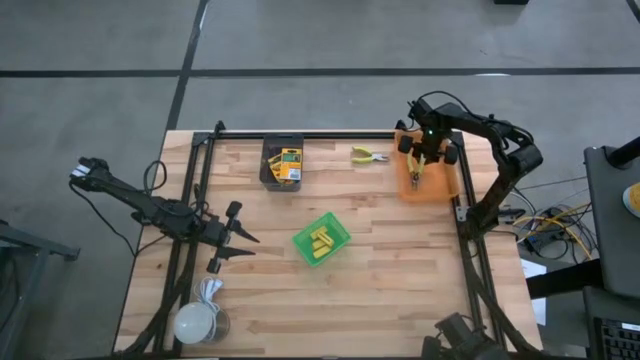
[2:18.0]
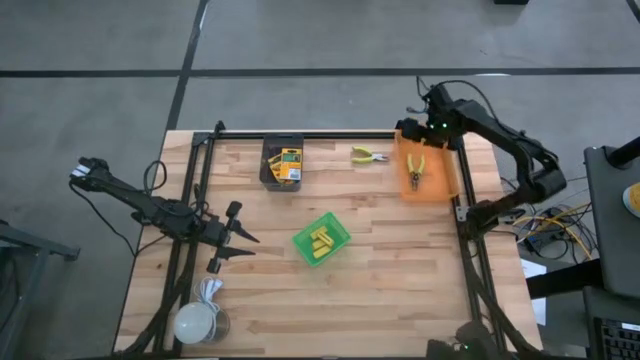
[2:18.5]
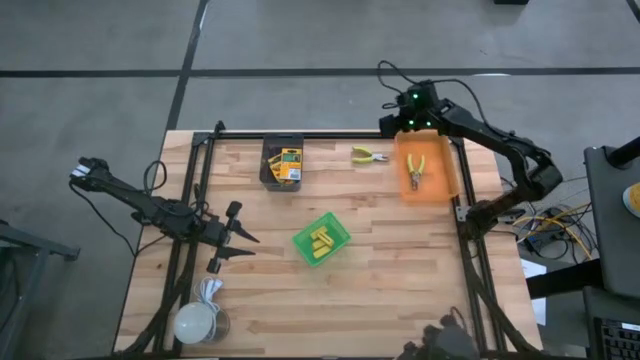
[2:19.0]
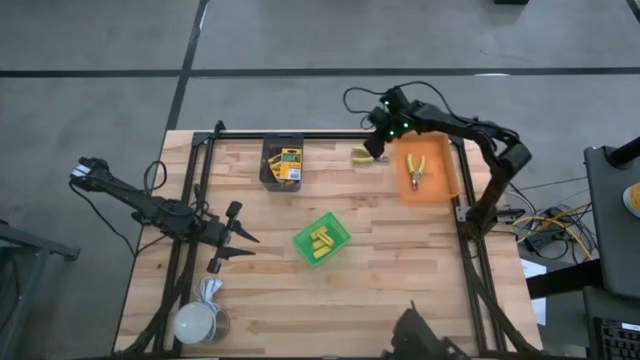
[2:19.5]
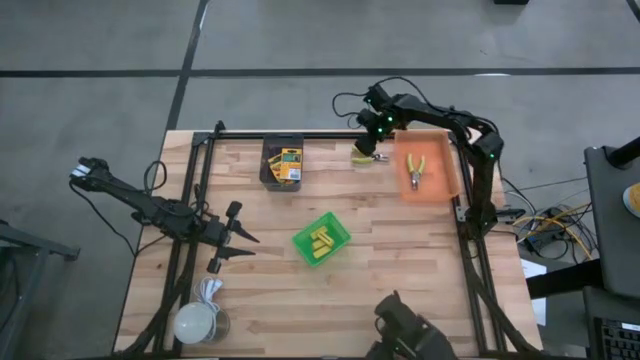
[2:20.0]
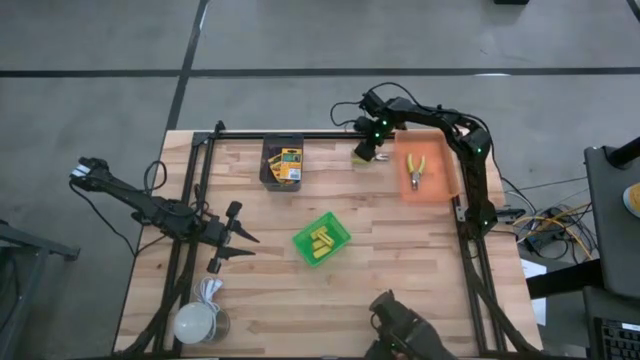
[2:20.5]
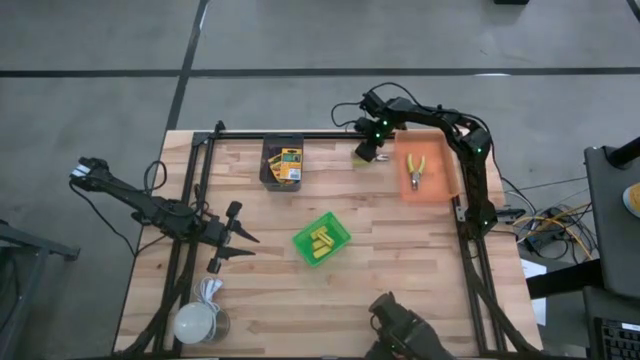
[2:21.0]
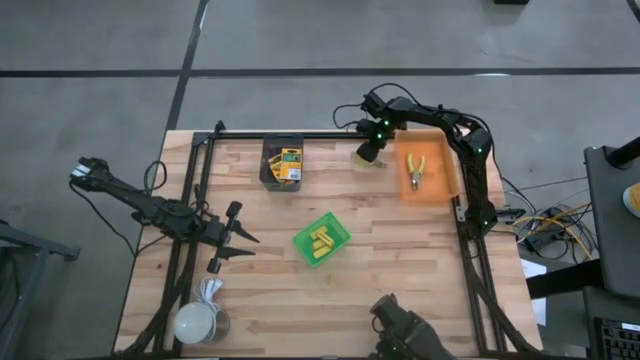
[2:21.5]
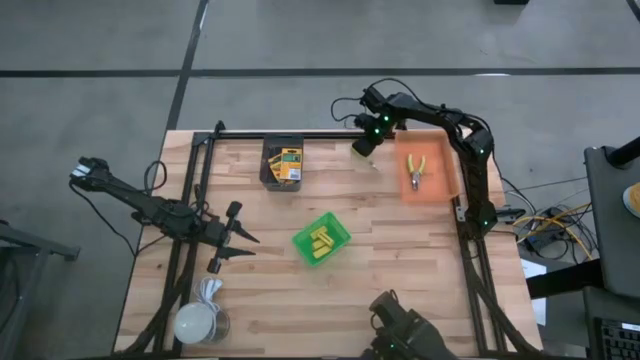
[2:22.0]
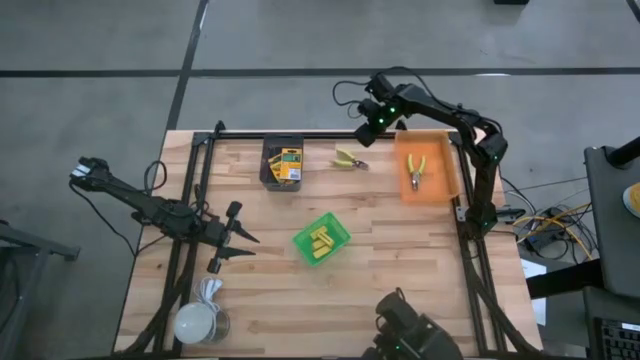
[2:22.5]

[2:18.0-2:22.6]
Task: Pick & Place School Supplies
Put the green hole puncher into the orange bin

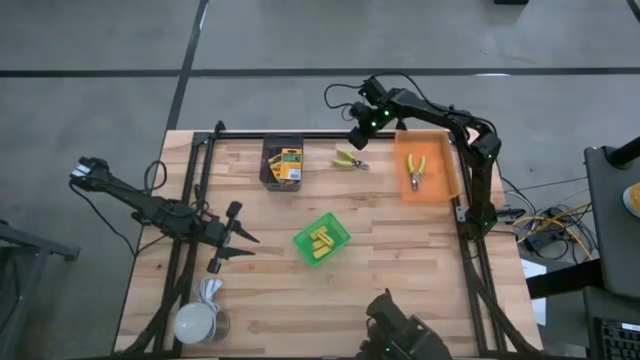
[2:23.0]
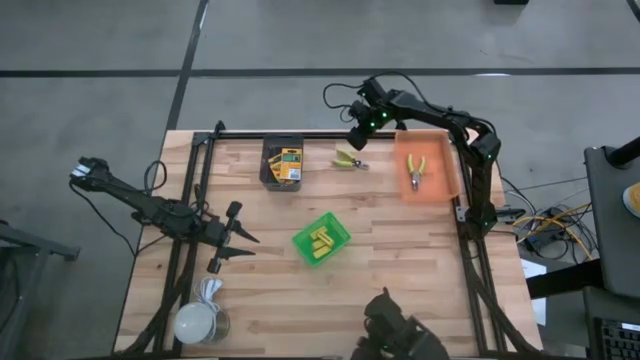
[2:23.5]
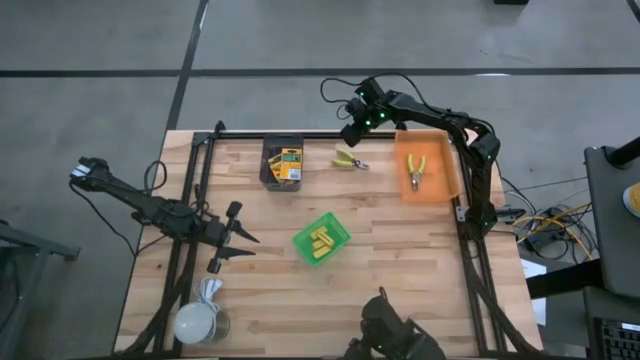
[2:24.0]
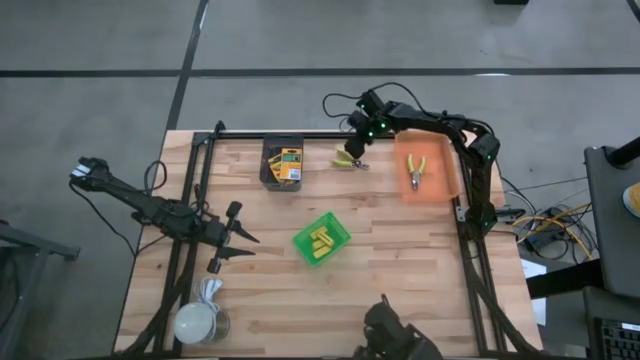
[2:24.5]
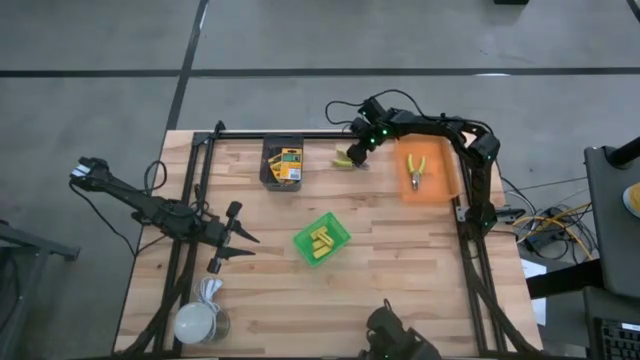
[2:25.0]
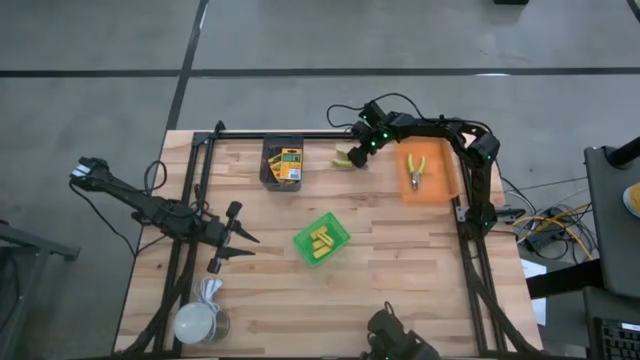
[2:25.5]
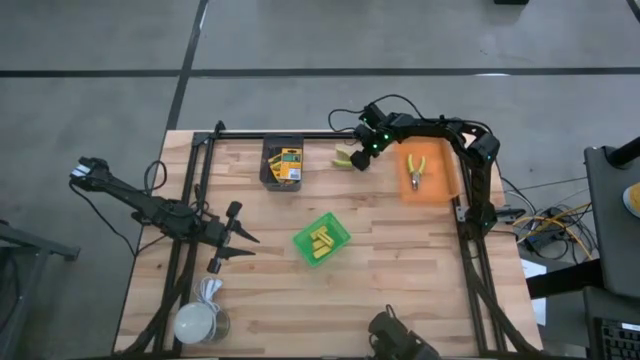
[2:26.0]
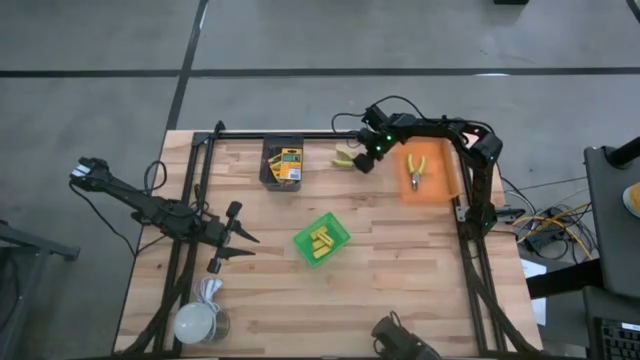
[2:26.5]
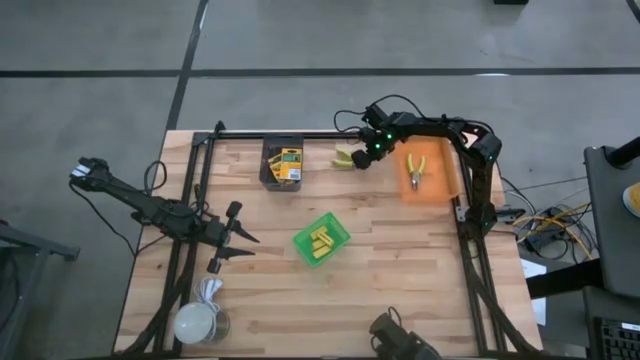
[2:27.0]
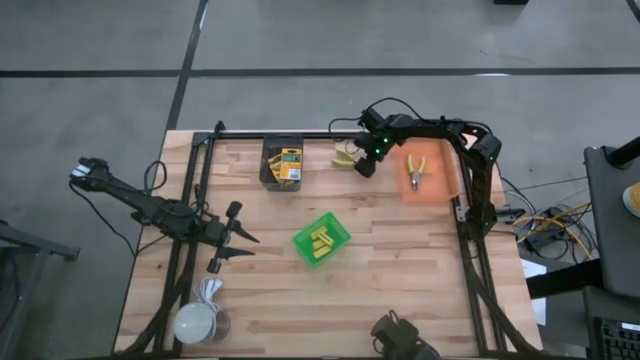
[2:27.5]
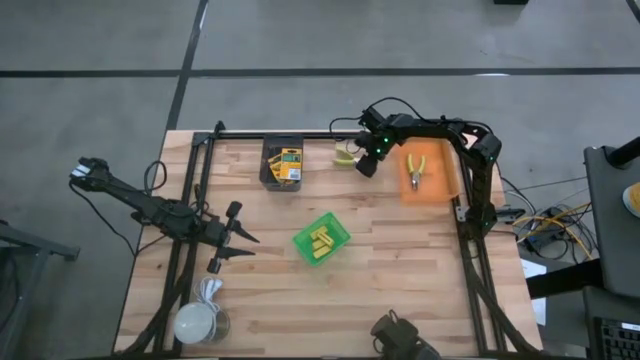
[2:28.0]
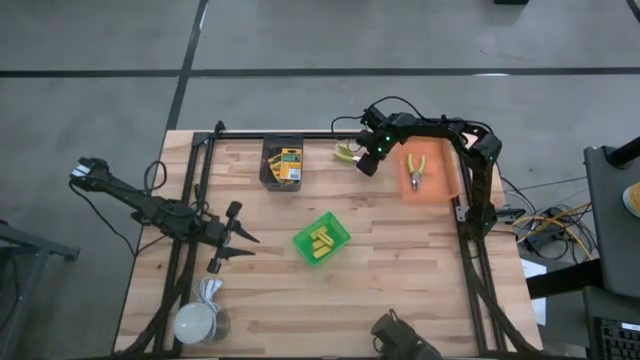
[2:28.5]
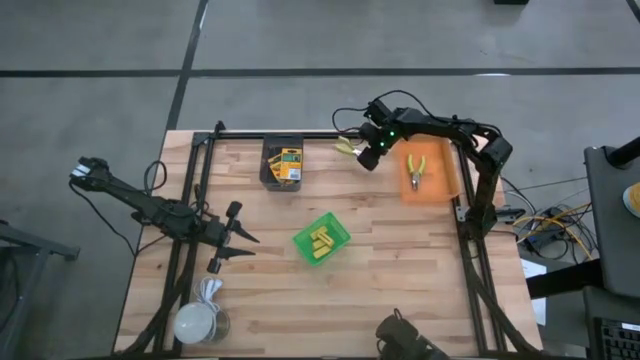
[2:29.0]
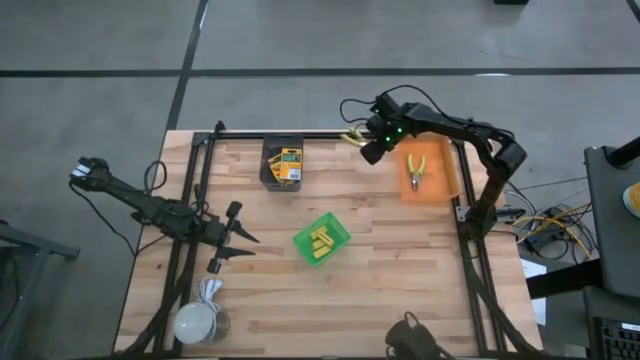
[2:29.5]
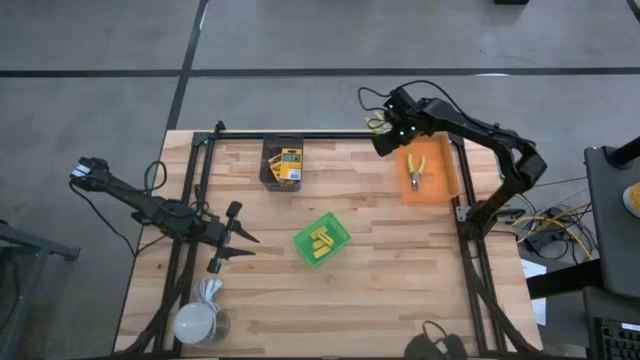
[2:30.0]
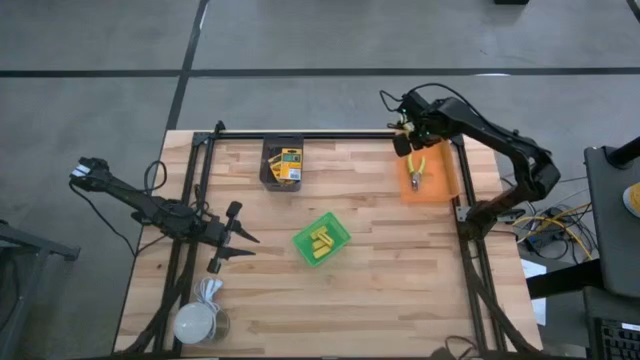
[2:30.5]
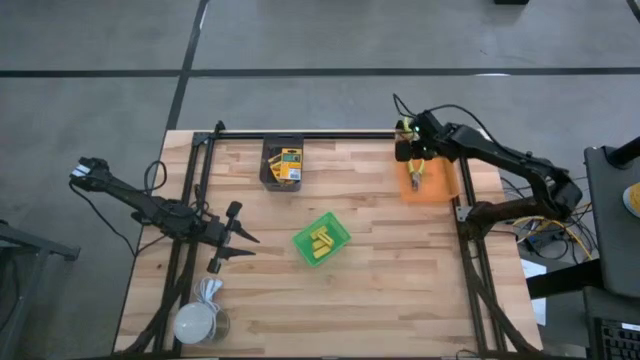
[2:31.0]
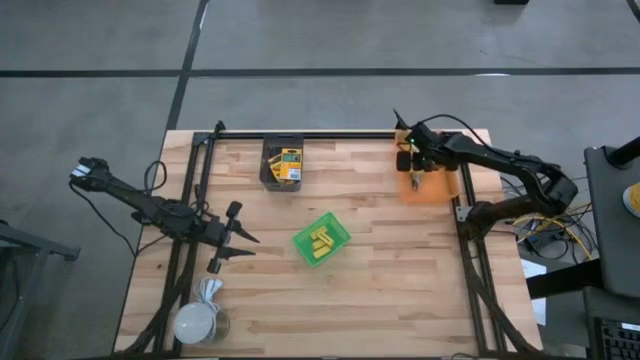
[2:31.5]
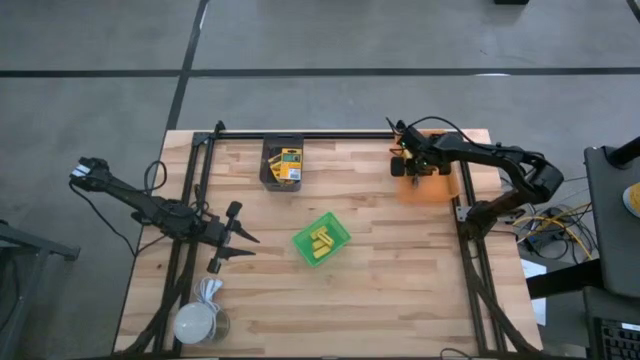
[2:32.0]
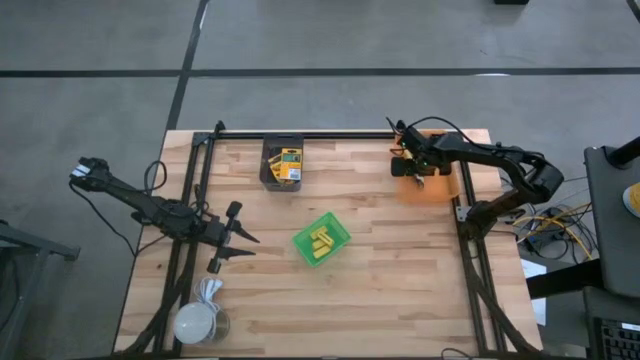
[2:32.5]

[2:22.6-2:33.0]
Put the green hole puncher into the orange bin

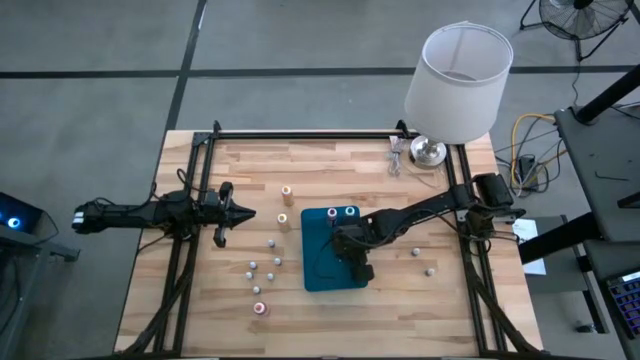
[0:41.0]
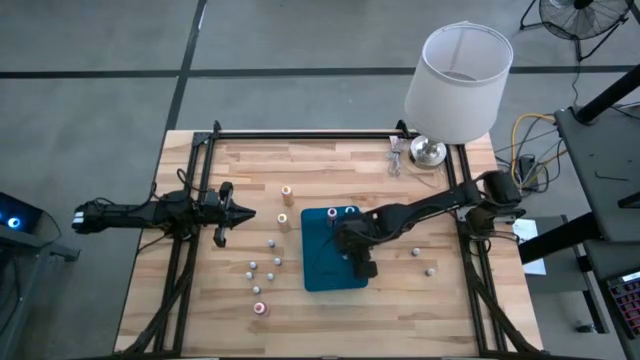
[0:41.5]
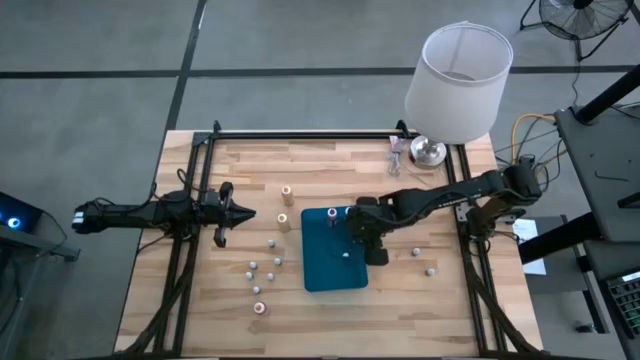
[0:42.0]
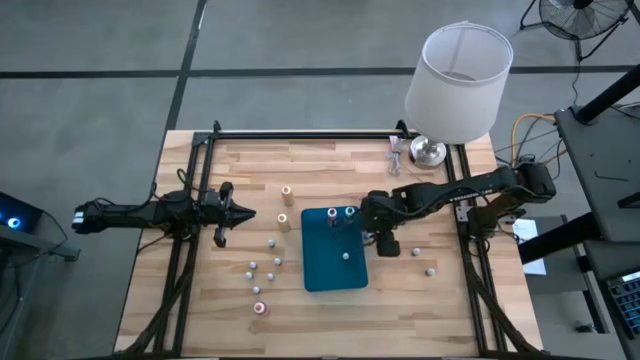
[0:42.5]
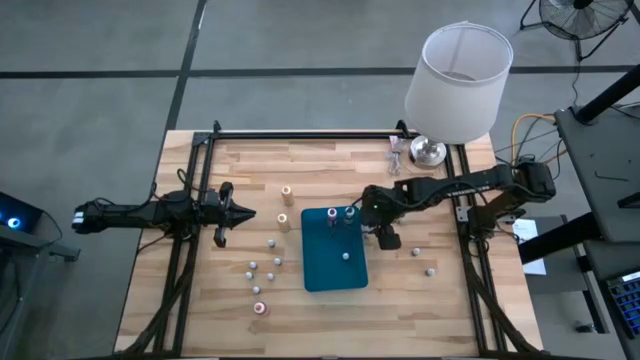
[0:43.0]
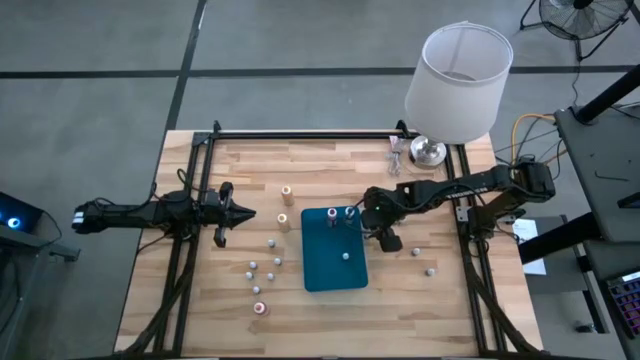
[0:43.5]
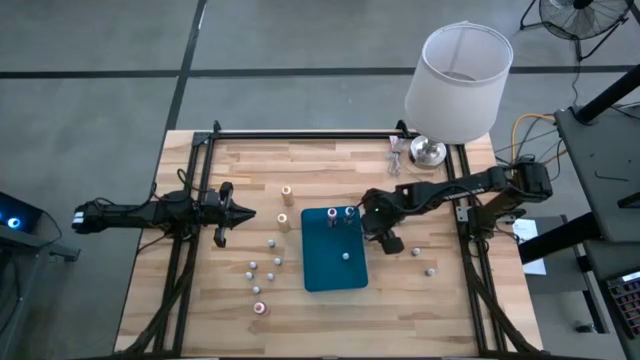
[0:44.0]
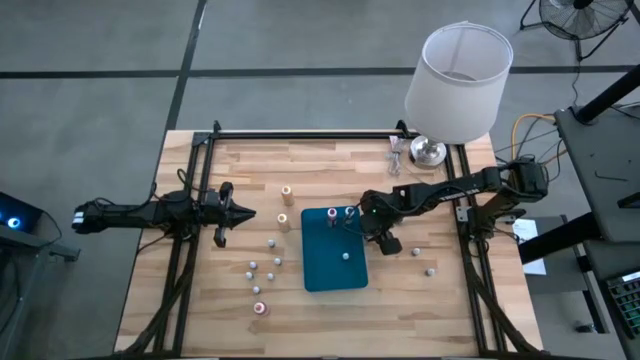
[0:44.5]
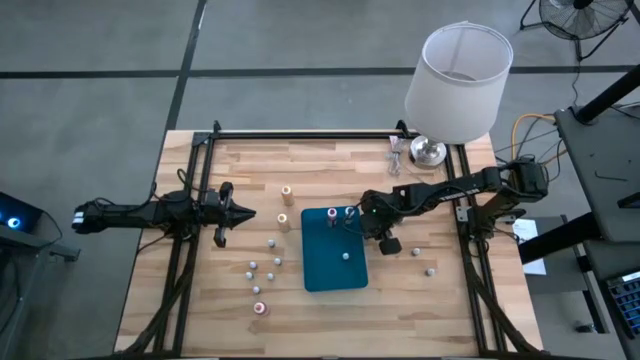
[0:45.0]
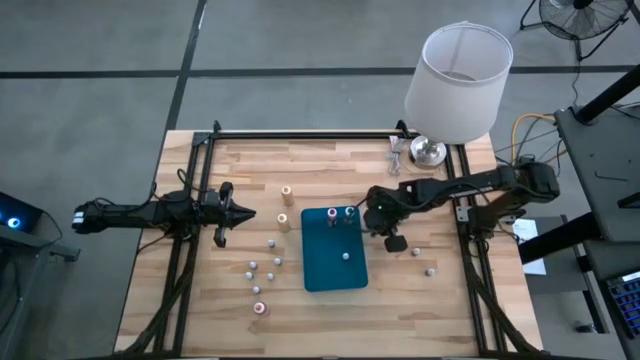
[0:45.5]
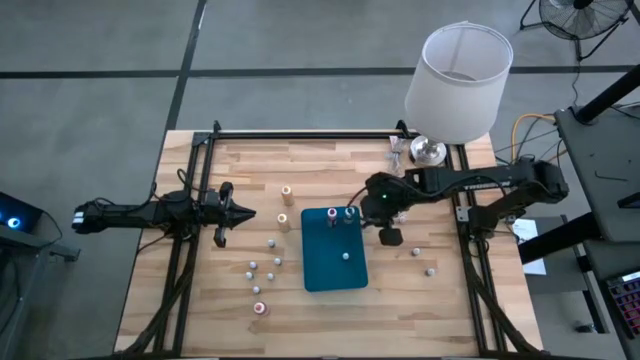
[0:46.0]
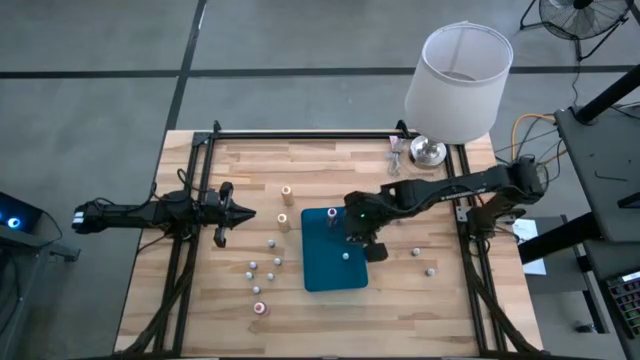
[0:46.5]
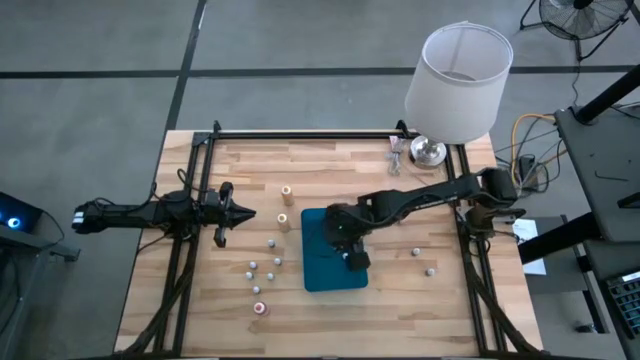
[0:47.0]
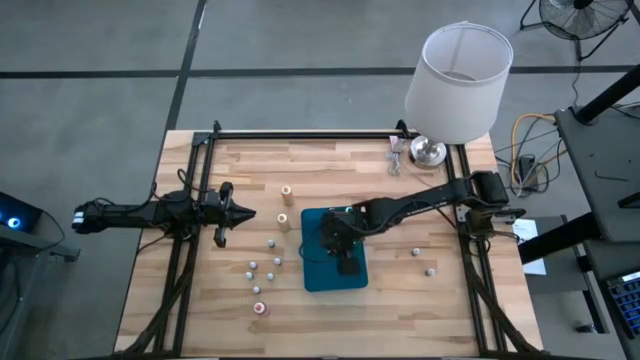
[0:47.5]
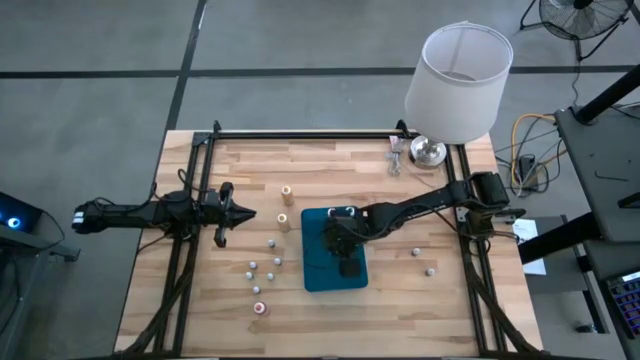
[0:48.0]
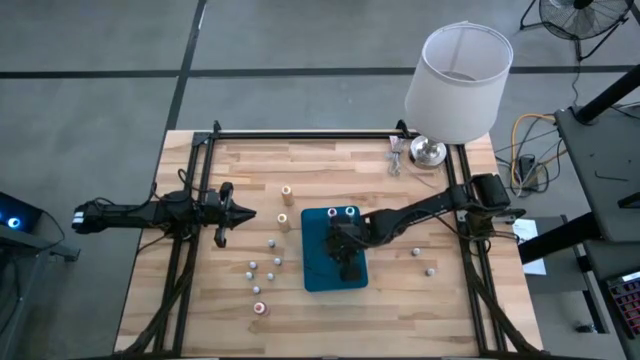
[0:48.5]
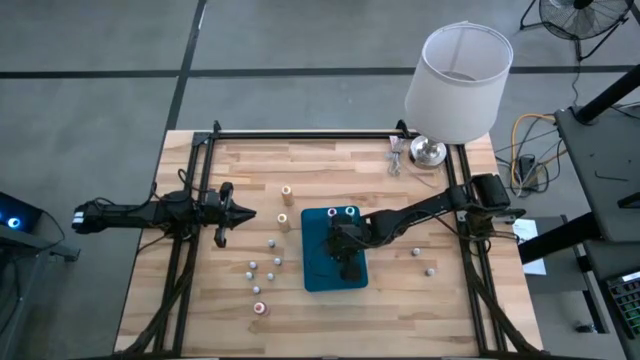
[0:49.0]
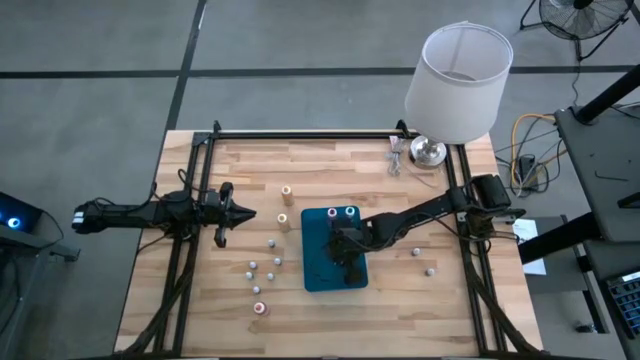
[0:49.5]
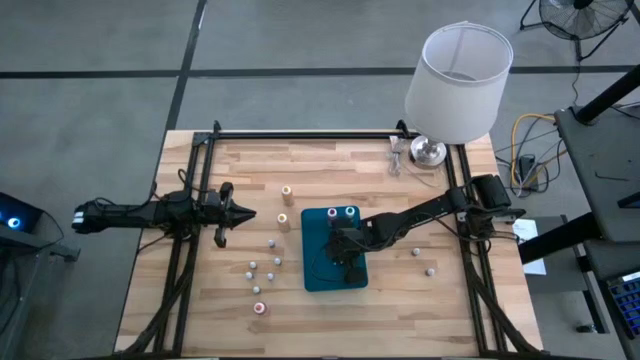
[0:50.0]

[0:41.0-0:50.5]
Task: Pick & Place food coloring
Put the small purple food coloring bottle into the blue bin
